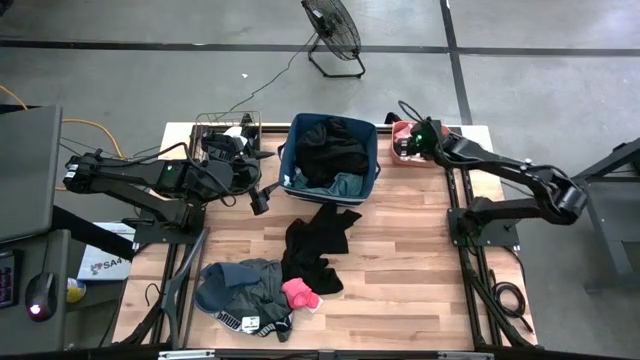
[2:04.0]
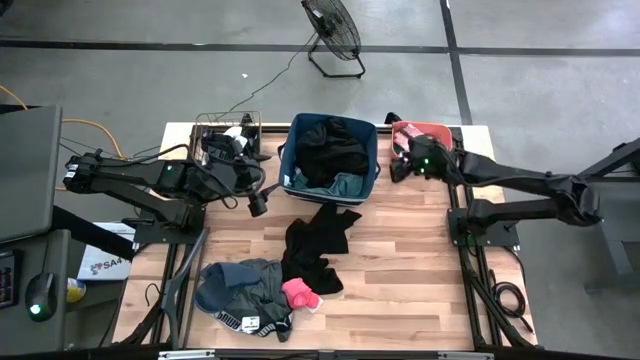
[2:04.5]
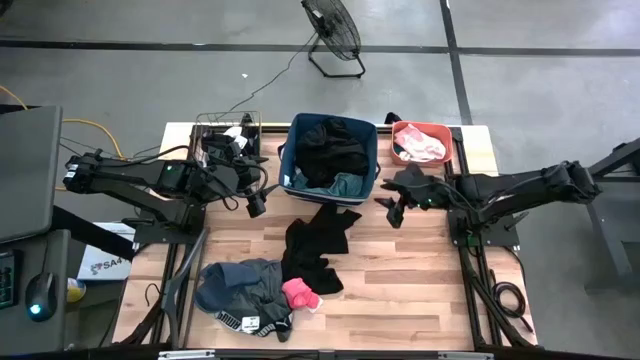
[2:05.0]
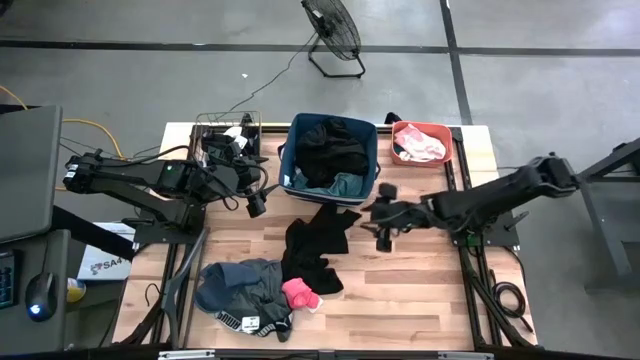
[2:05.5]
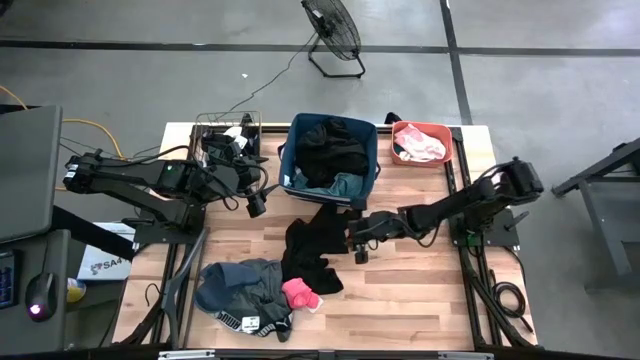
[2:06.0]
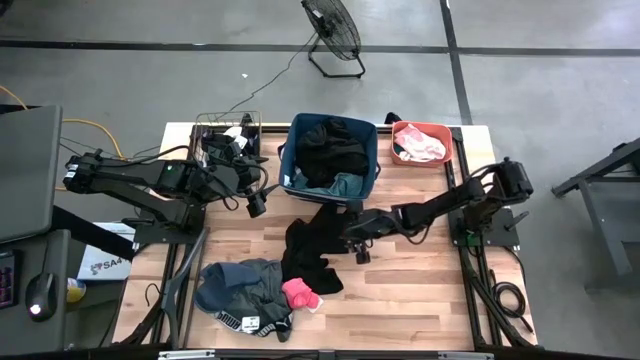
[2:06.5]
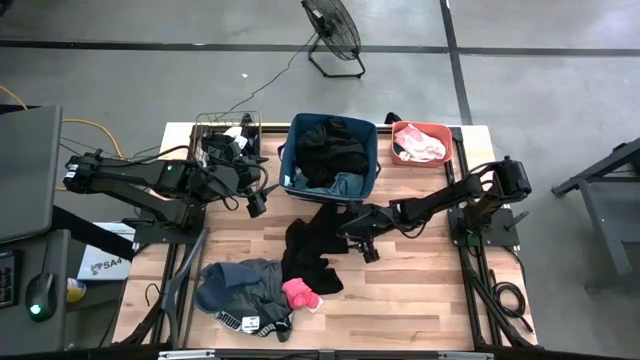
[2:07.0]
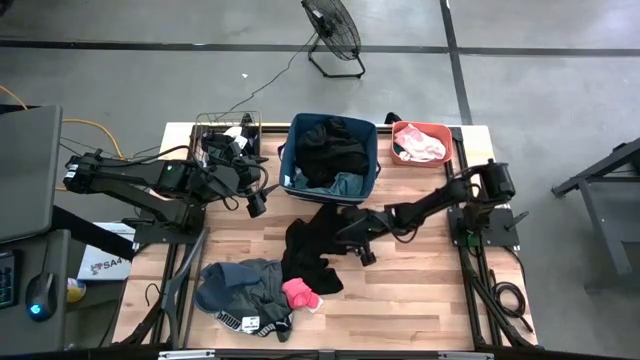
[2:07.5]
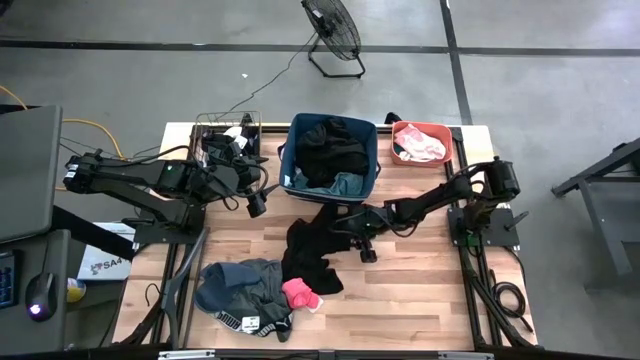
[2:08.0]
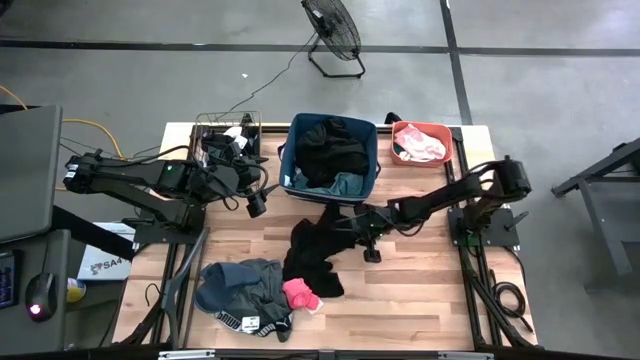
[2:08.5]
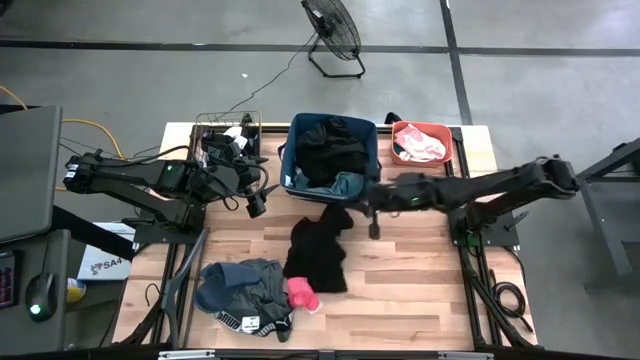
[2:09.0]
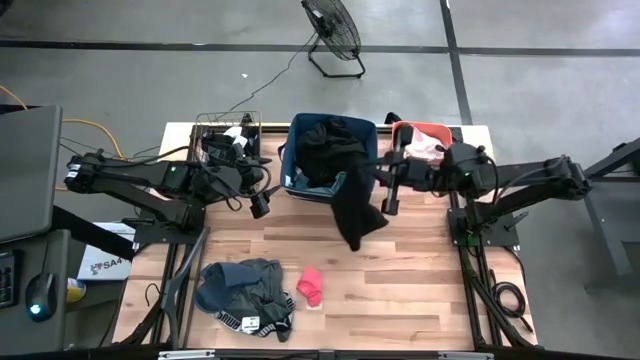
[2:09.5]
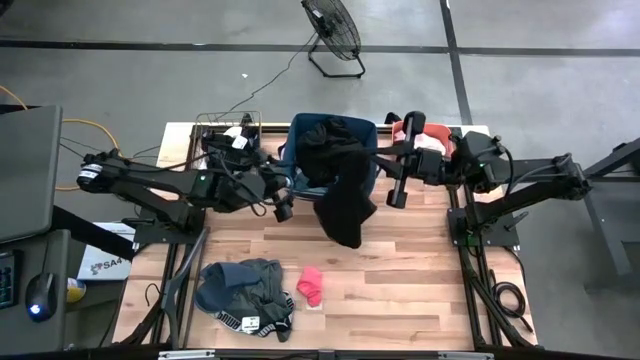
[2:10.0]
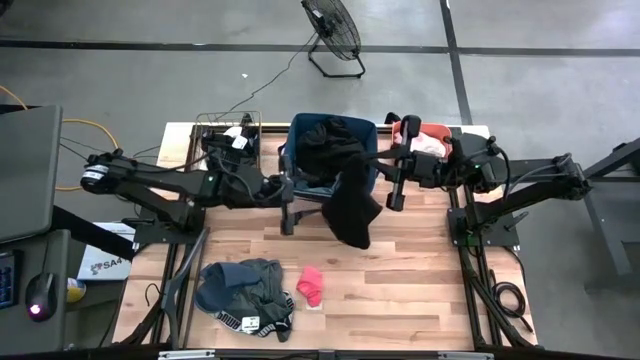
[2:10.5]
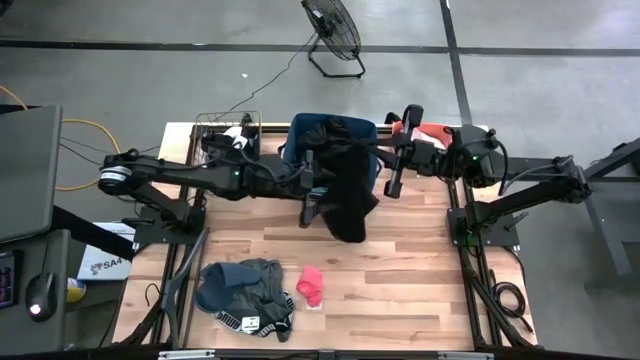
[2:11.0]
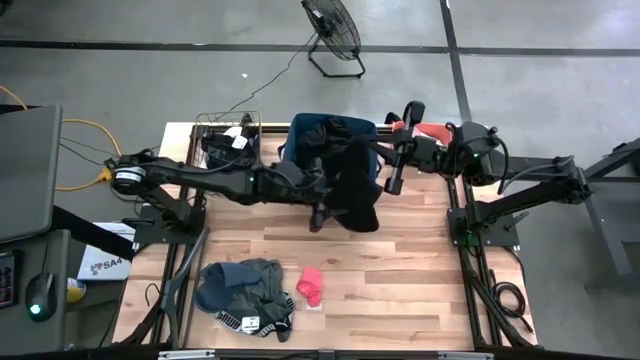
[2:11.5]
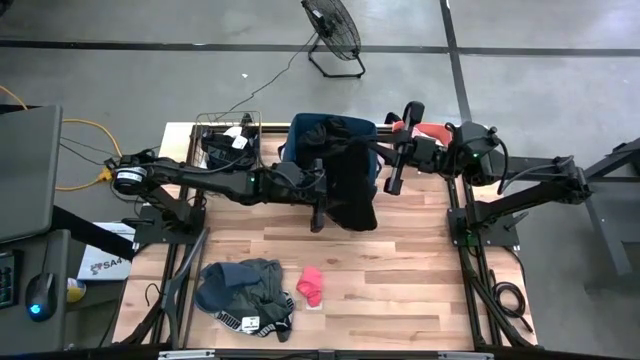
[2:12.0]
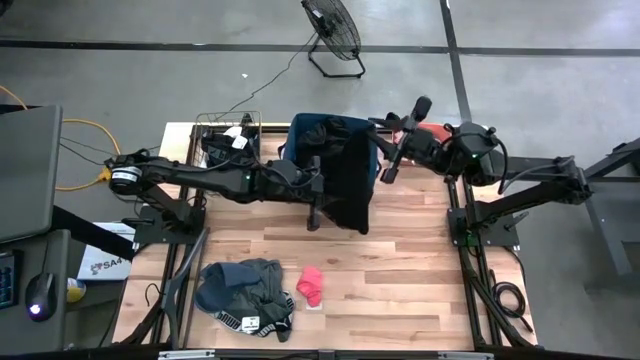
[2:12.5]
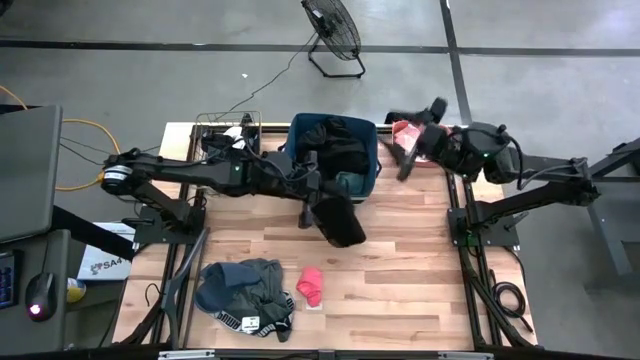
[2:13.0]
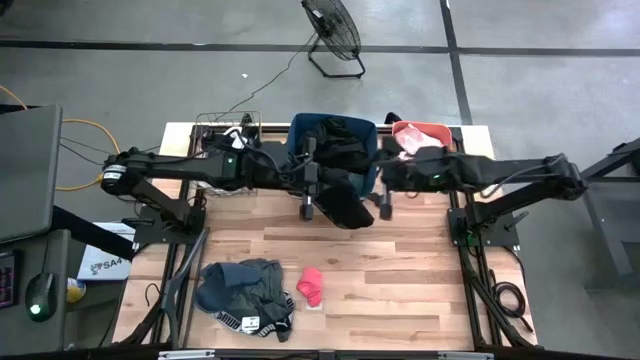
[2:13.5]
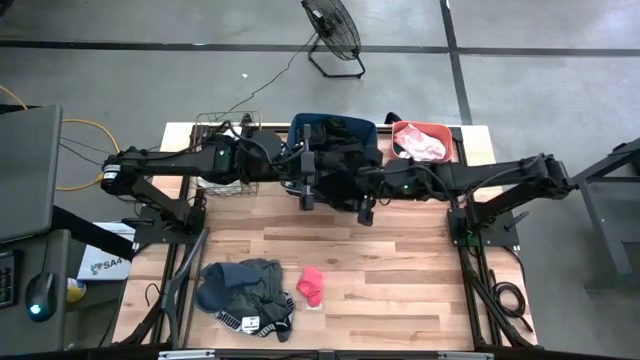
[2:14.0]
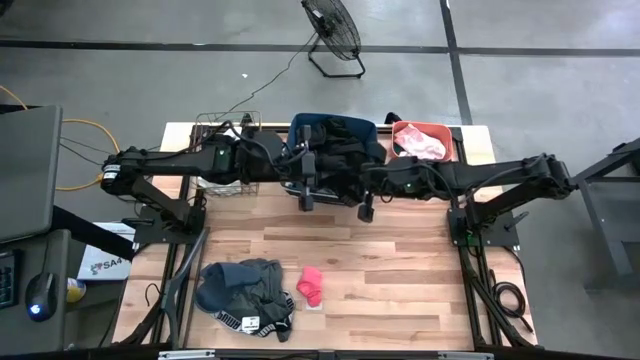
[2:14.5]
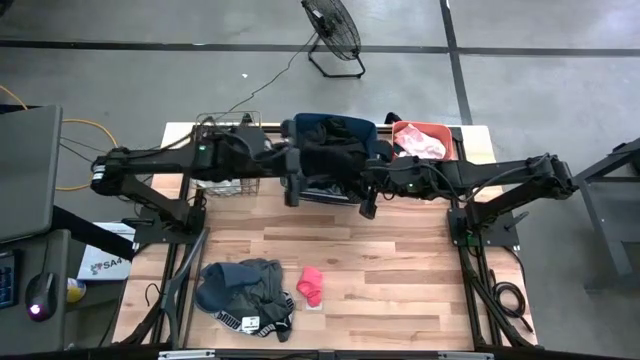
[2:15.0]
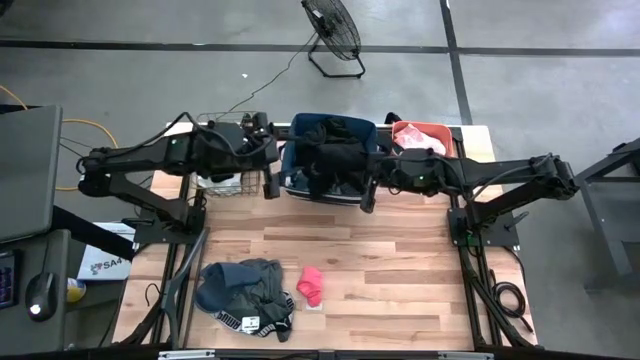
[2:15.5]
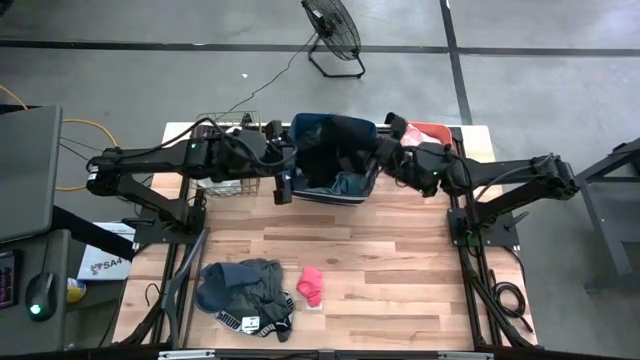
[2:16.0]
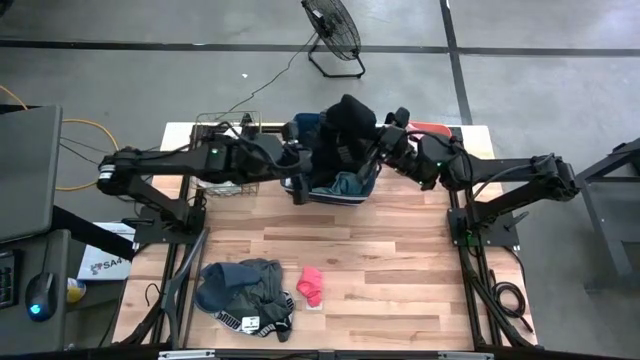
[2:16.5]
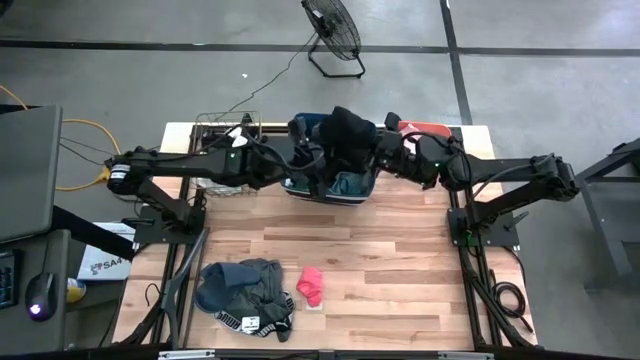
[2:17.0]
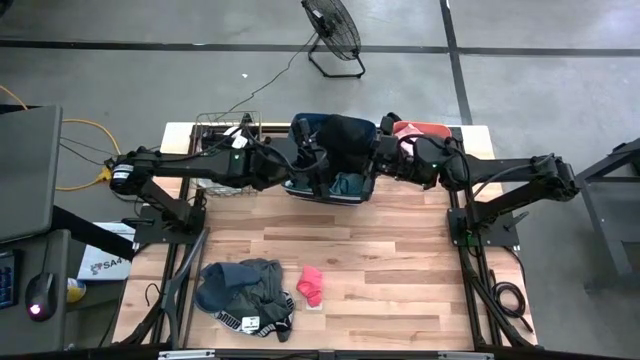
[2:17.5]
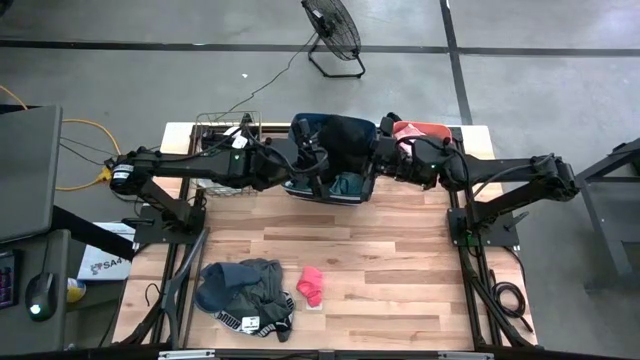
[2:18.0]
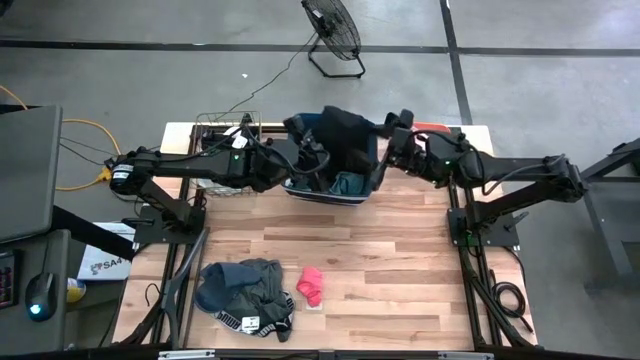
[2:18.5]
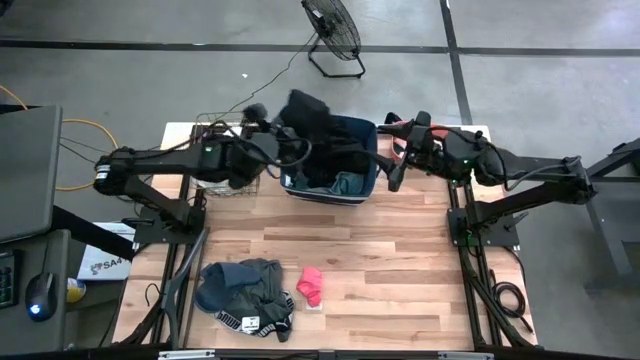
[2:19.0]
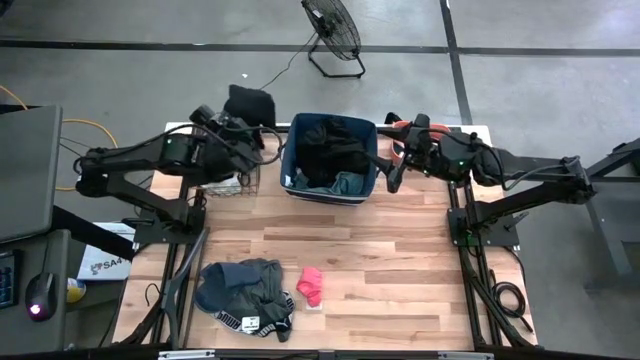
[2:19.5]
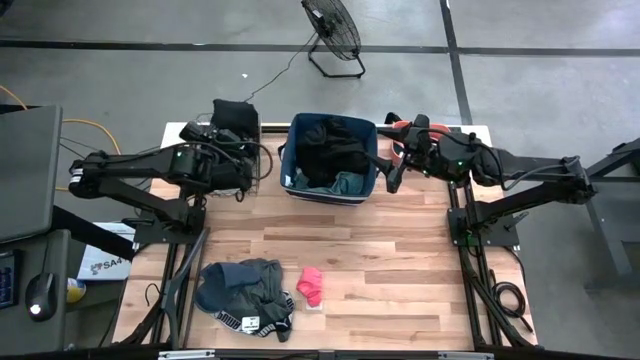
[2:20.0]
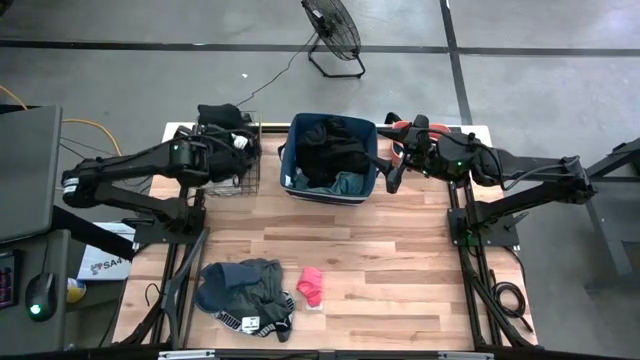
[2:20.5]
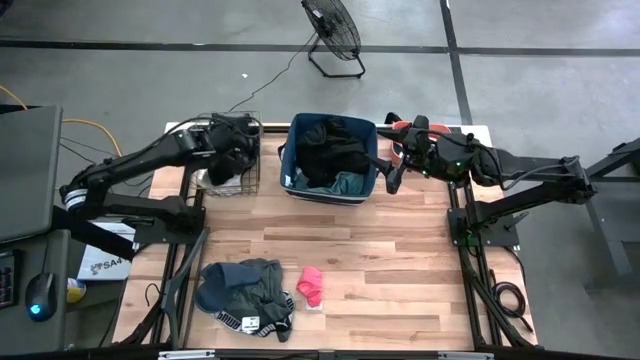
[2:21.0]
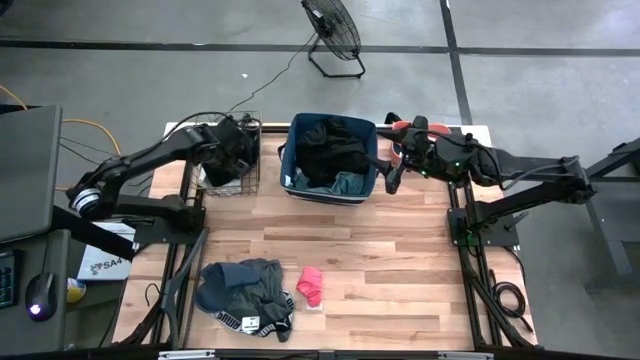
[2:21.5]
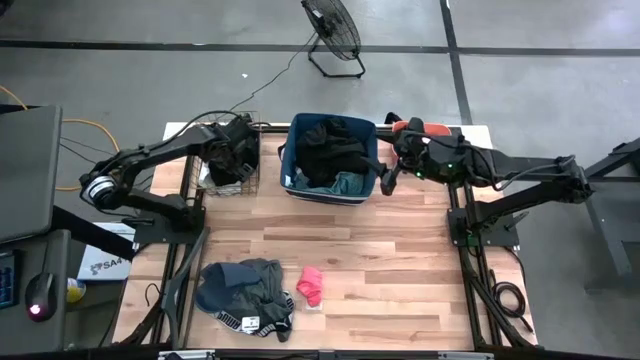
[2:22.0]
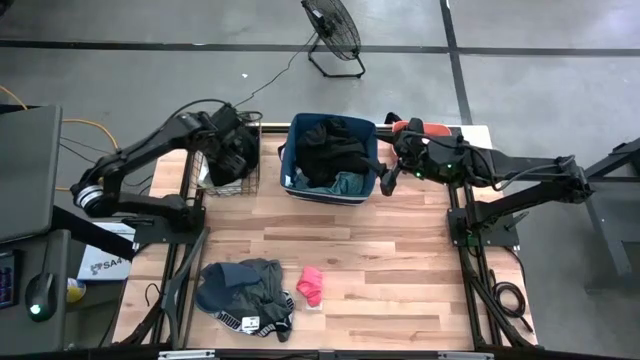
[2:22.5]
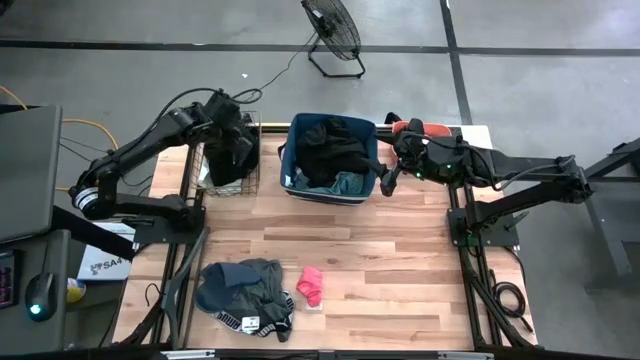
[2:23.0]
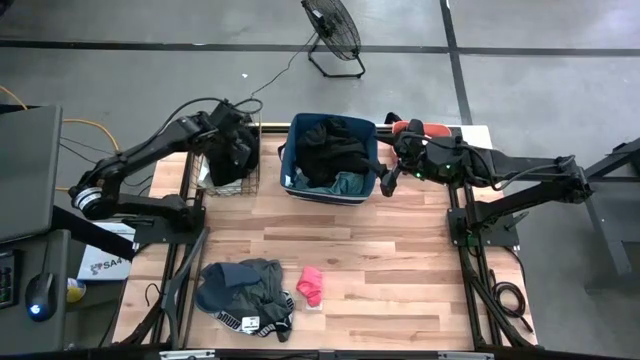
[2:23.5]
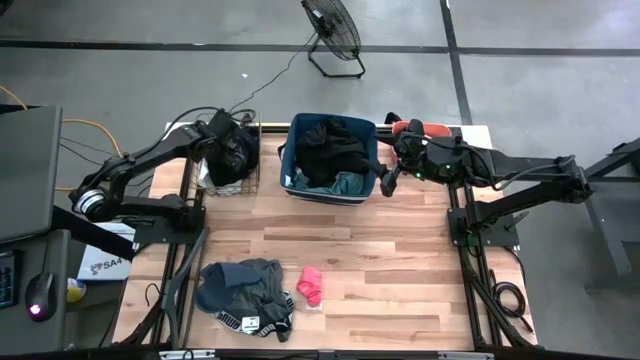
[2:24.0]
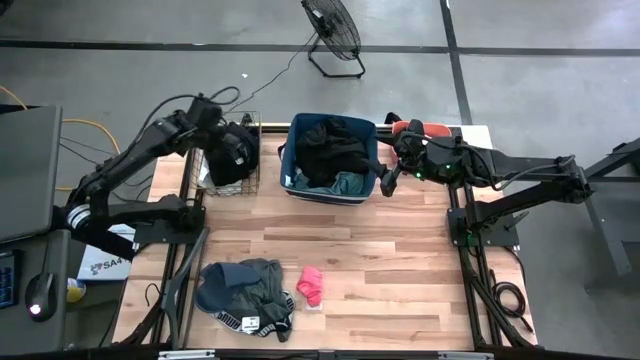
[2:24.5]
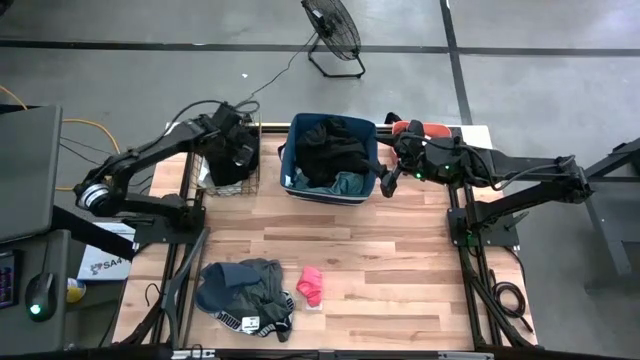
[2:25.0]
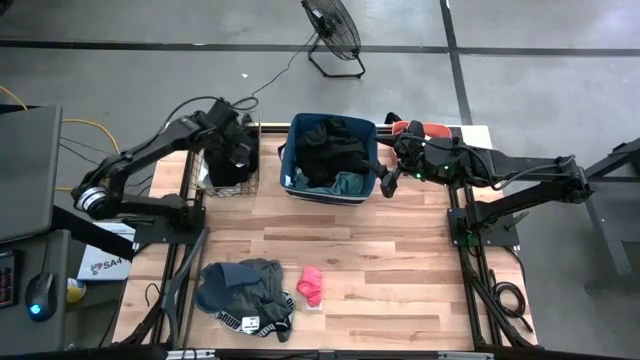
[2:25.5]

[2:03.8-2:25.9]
Task: Pick & Place Cloths
Put the black underwear into the wire basket
